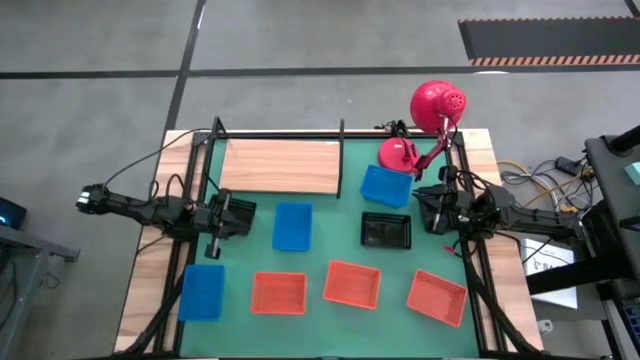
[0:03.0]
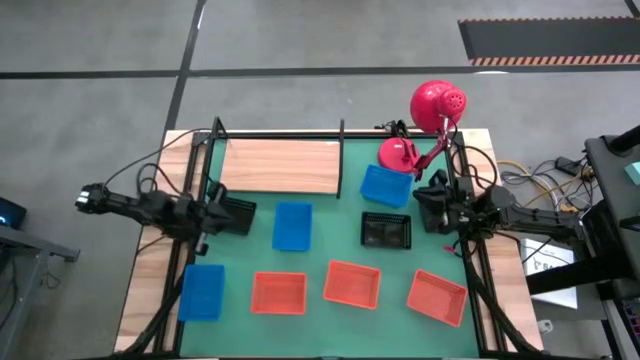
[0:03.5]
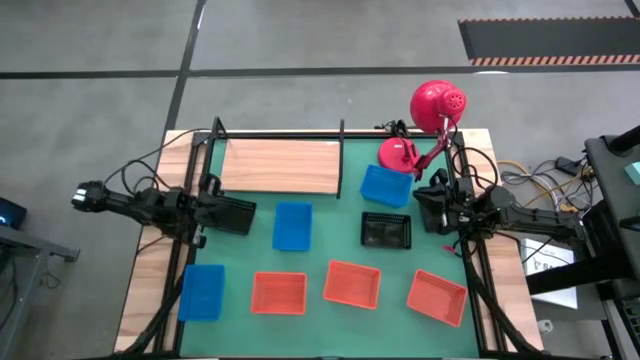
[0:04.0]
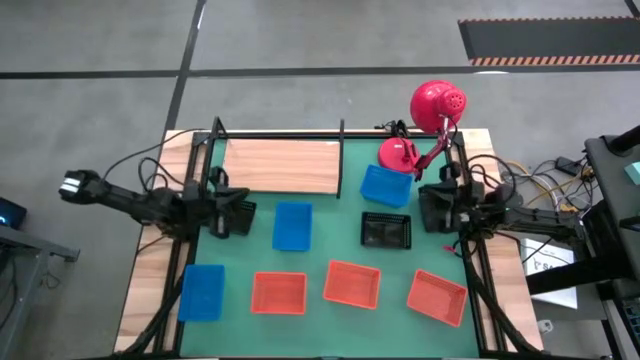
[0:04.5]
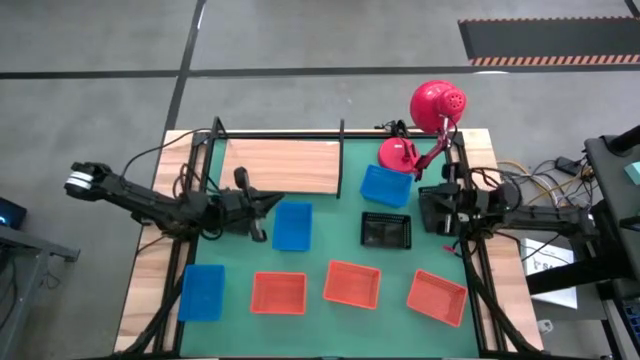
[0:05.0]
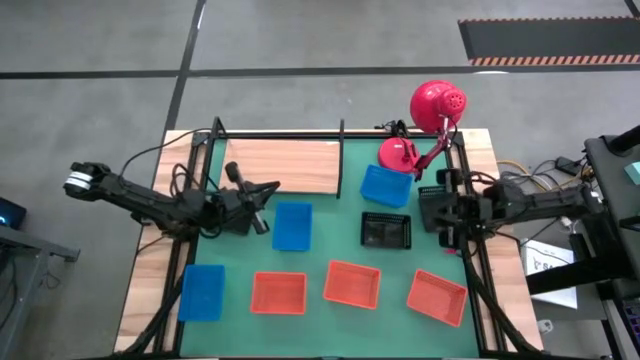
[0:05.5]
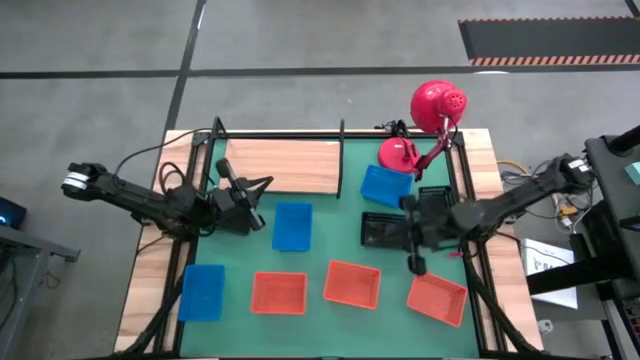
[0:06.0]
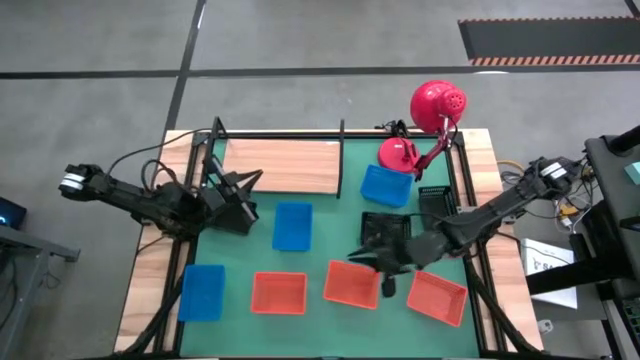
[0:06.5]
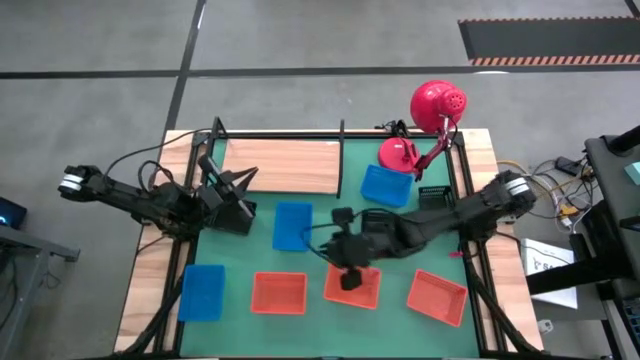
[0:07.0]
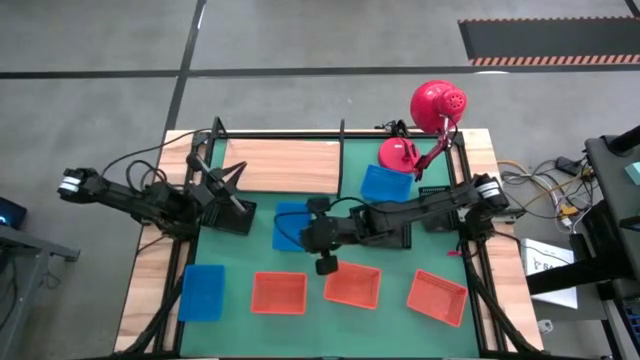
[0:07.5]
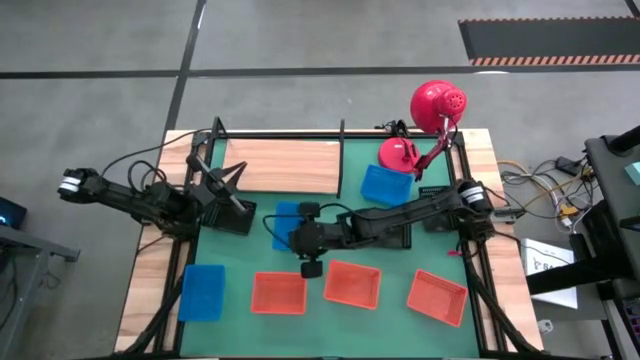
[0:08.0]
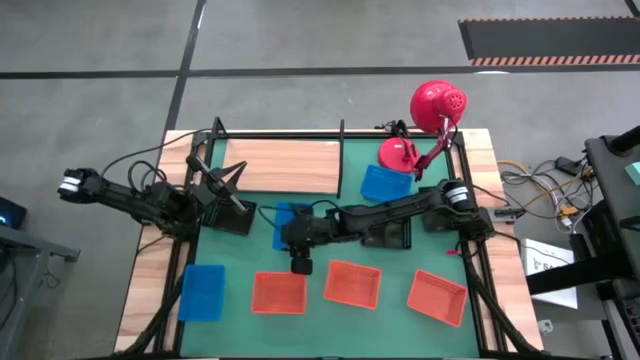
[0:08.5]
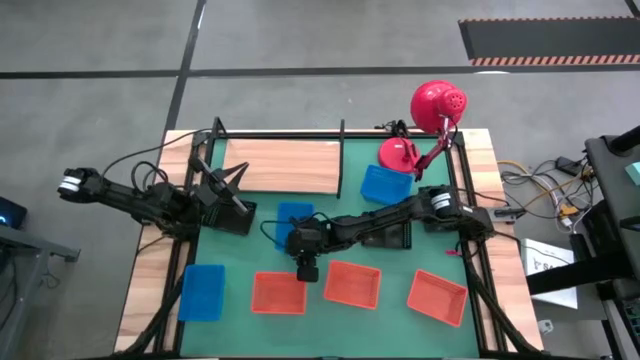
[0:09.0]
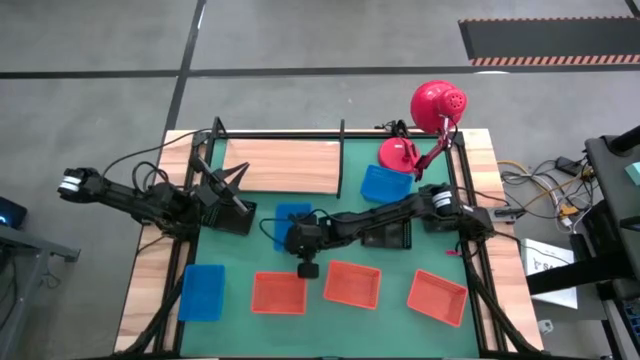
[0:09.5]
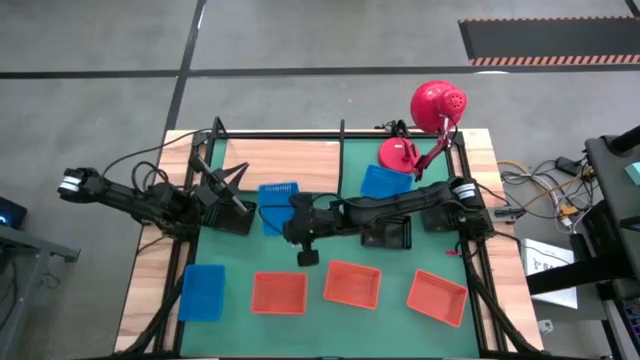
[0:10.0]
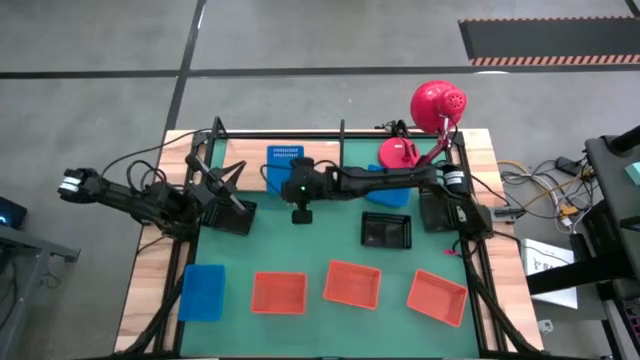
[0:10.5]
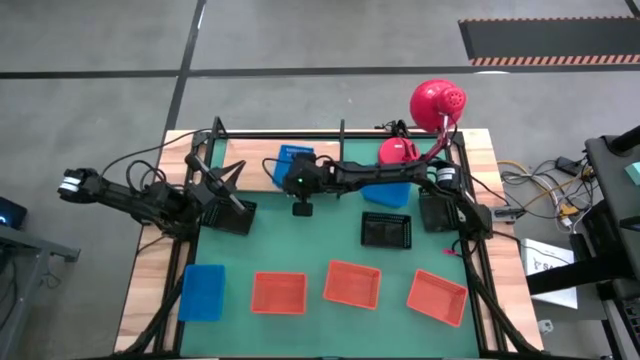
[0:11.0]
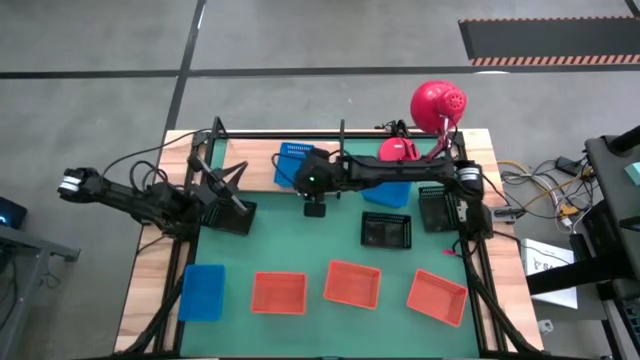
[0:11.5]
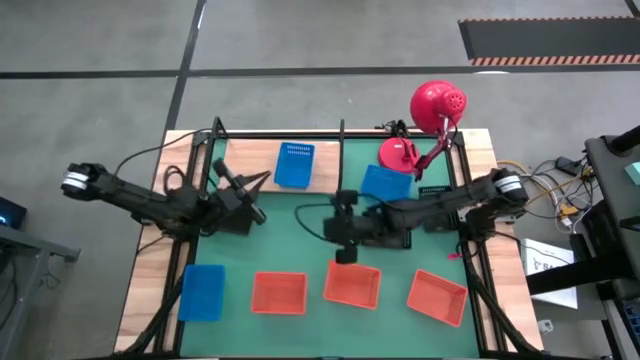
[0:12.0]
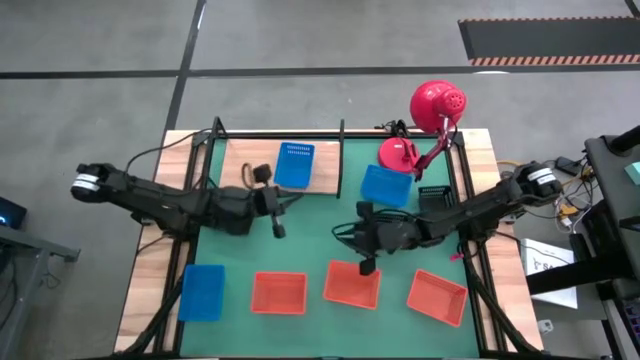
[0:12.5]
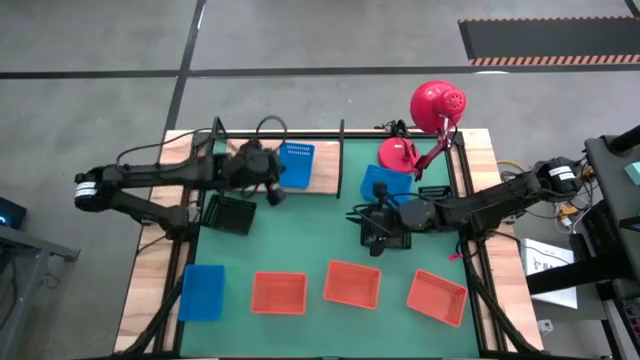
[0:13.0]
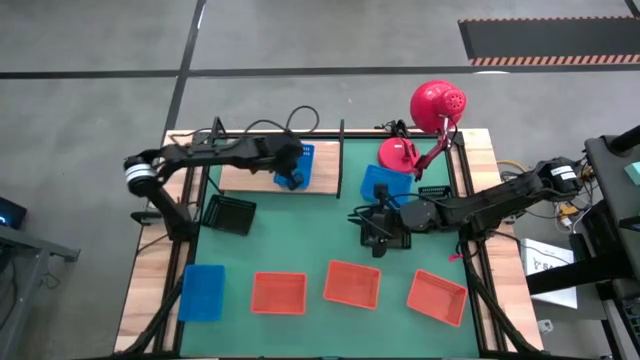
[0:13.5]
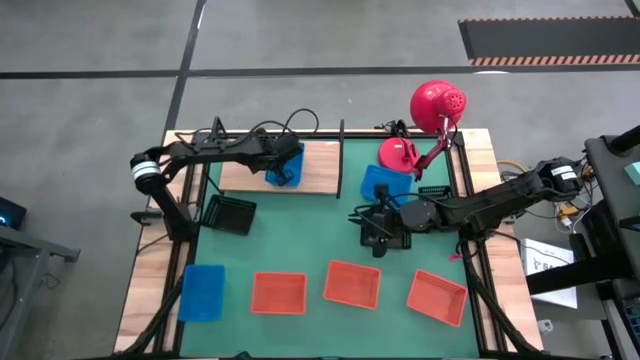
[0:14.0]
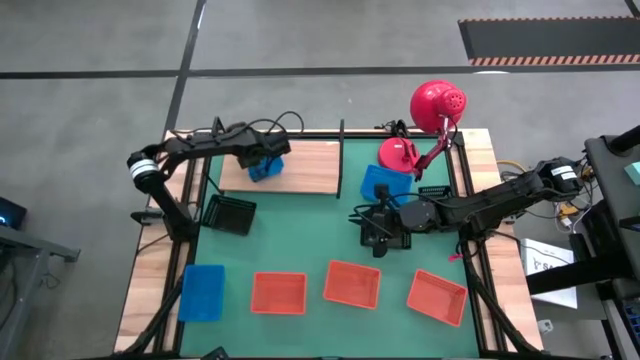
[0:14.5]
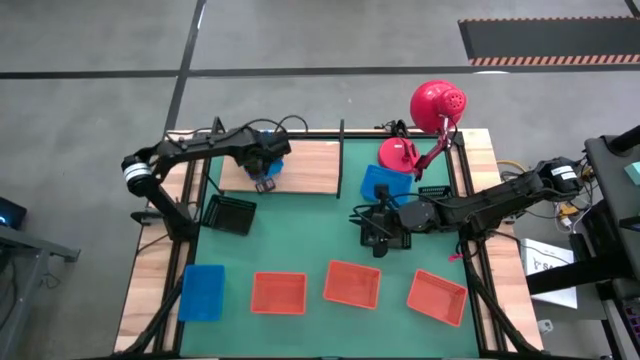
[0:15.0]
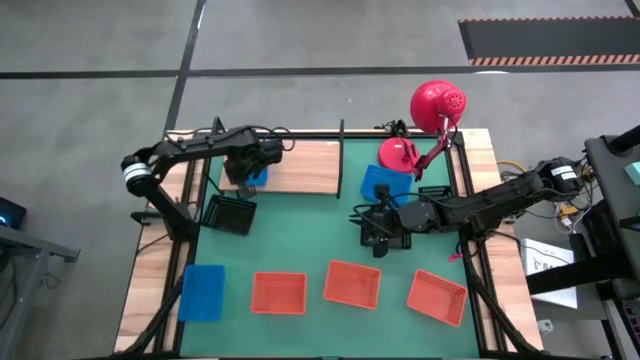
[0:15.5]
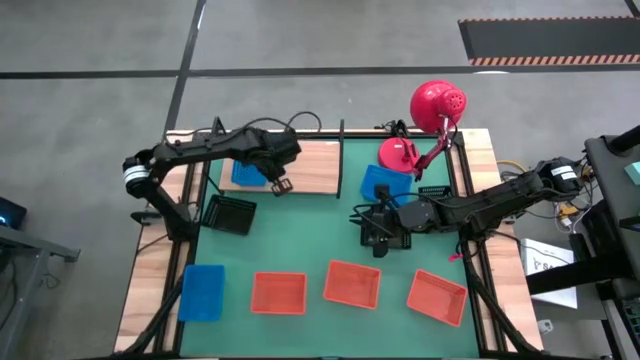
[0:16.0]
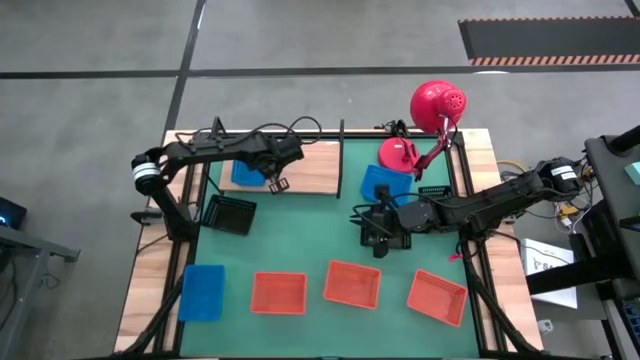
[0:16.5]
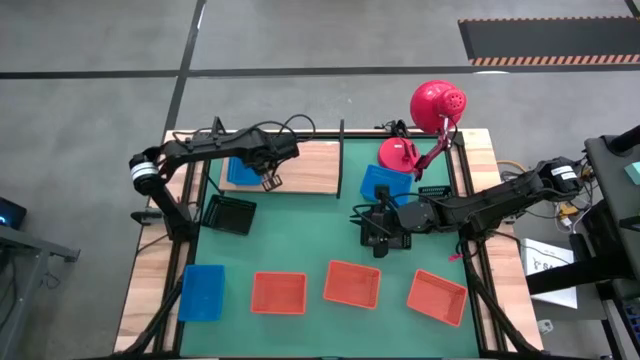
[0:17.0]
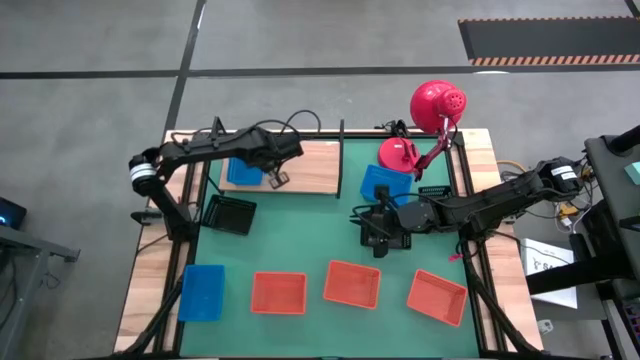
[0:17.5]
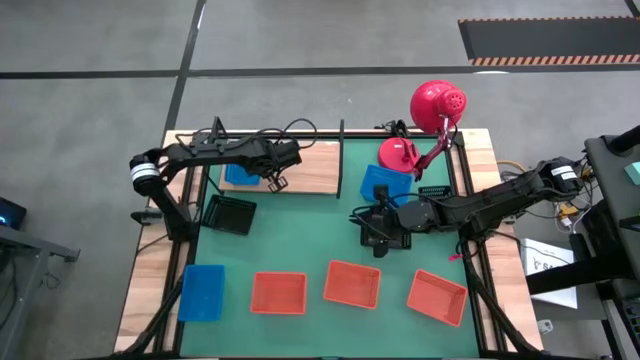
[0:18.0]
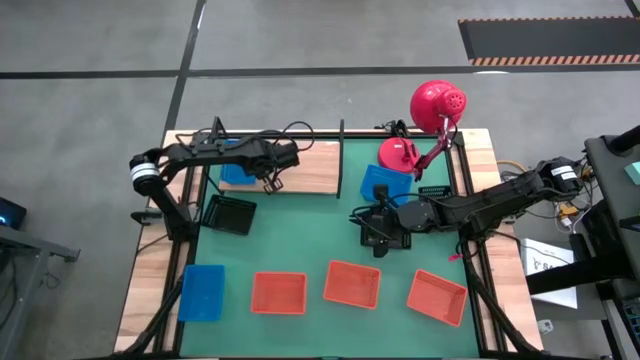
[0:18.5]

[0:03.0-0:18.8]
Task: Stack baskets on shelf by color
Put the middle blue bin on the shelf

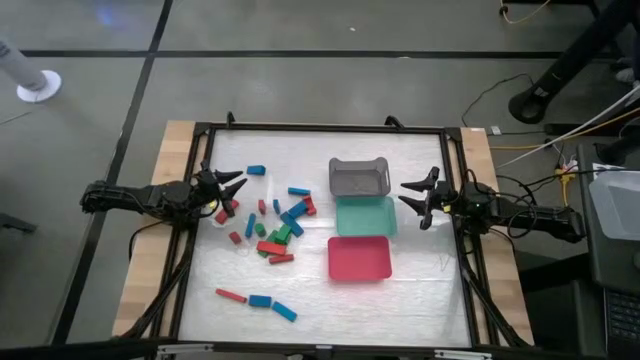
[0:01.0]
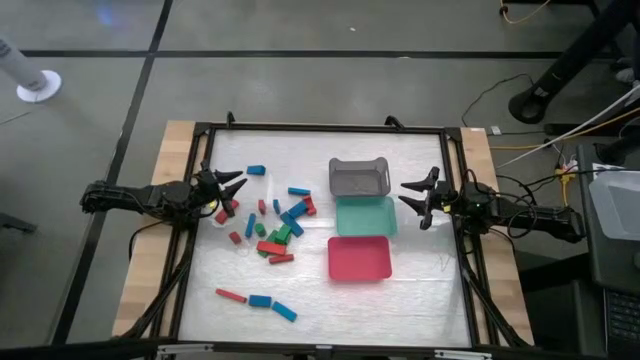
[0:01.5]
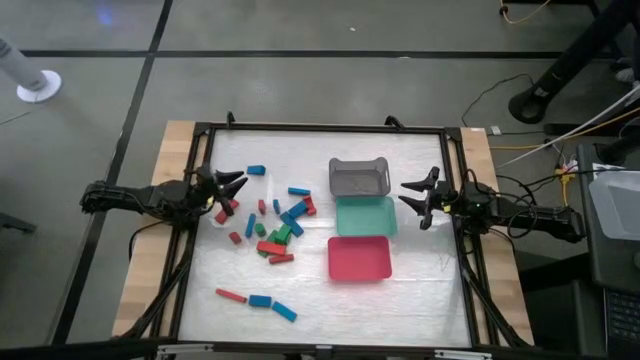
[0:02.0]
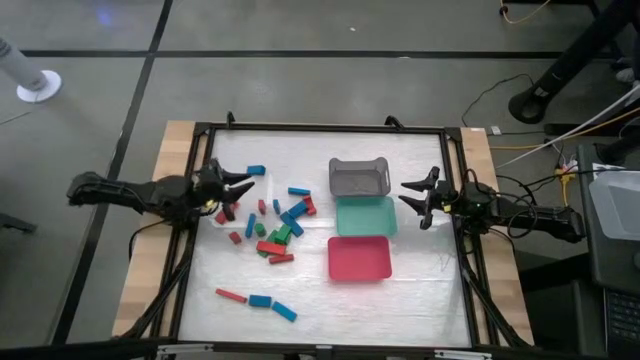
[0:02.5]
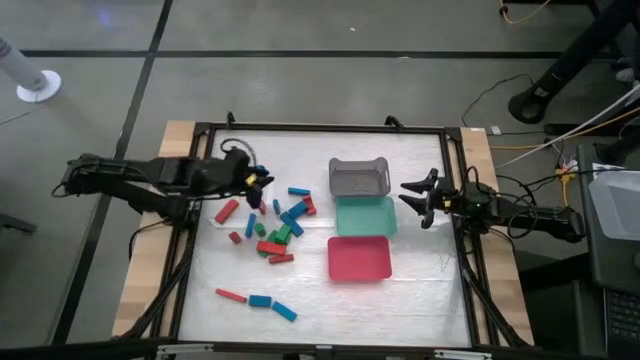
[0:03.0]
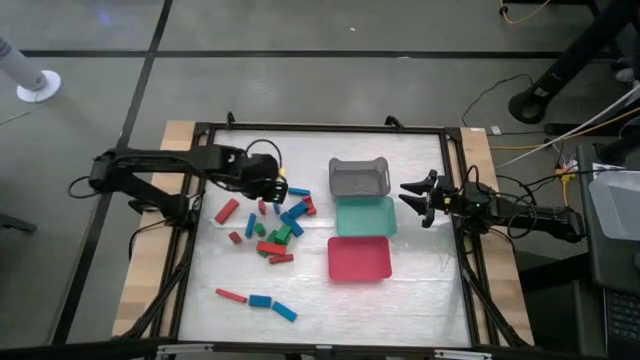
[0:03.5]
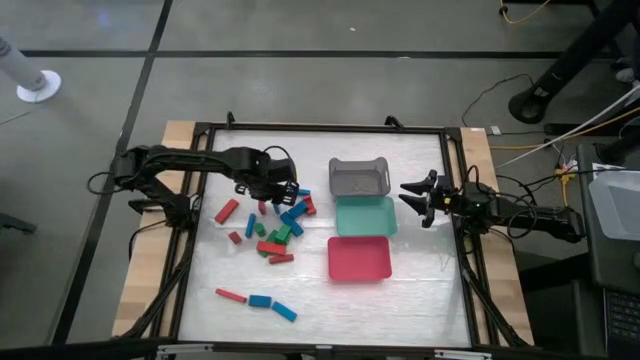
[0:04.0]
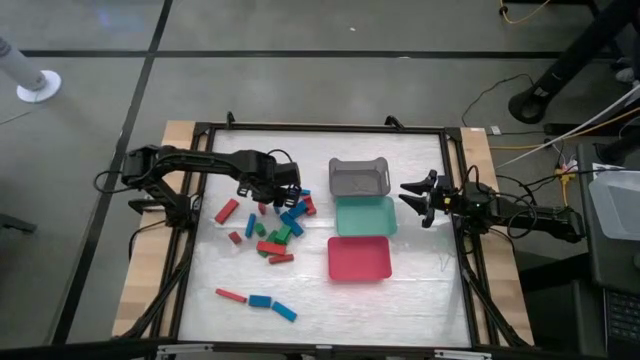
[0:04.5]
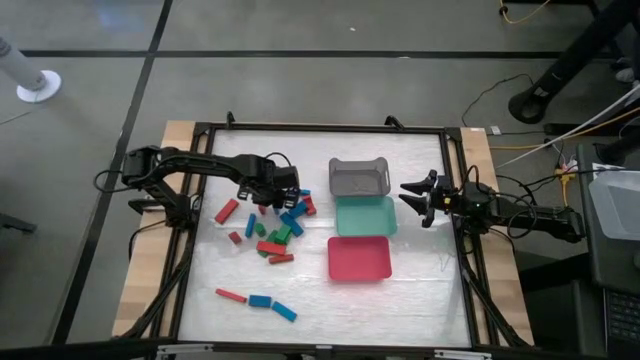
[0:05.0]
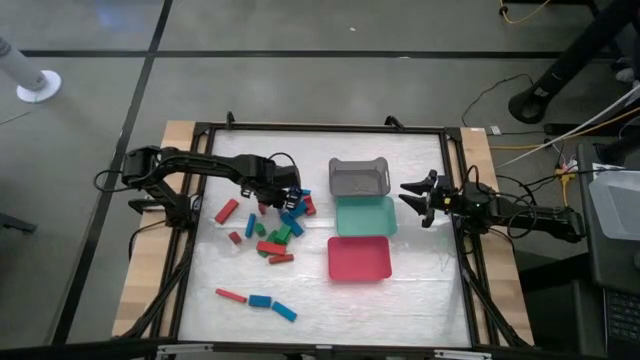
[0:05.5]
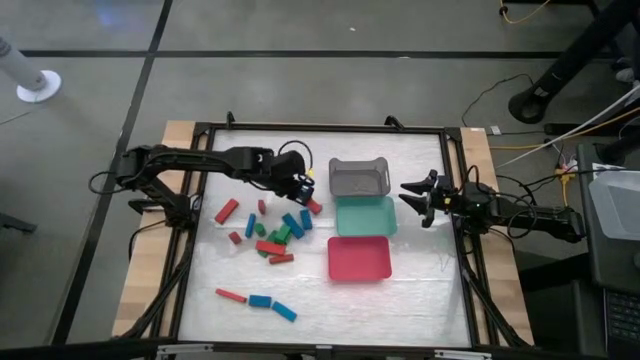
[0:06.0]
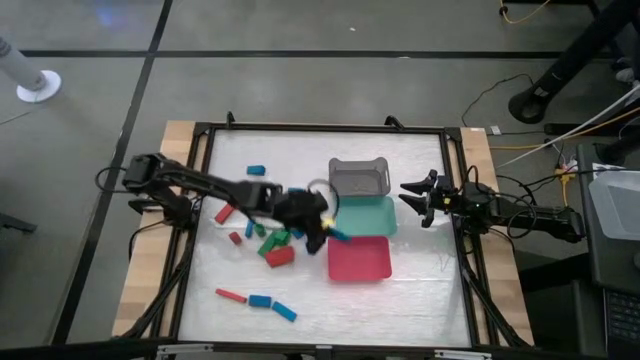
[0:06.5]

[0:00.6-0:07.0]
Task: Sort blocks
Put the blue block into the red bin
